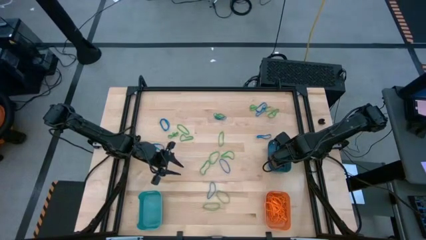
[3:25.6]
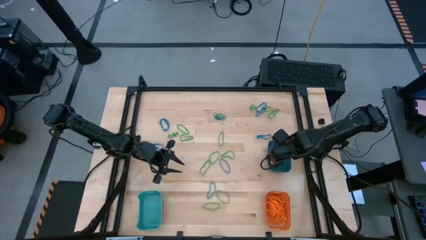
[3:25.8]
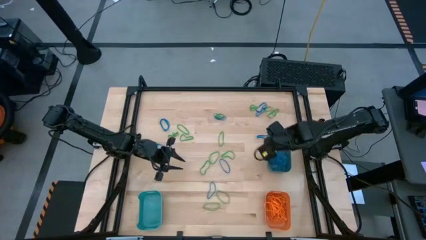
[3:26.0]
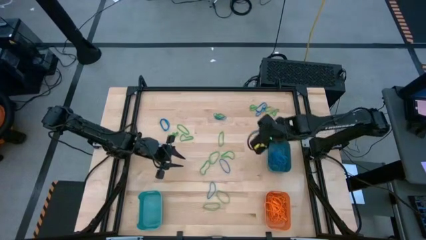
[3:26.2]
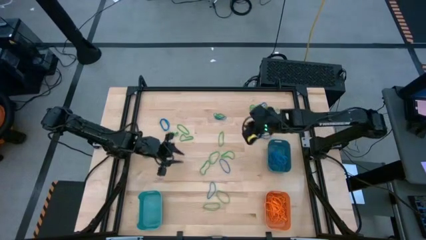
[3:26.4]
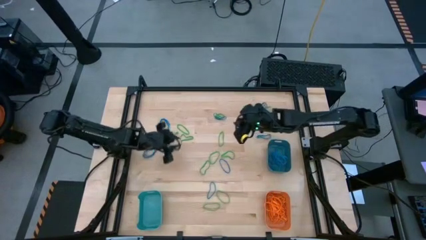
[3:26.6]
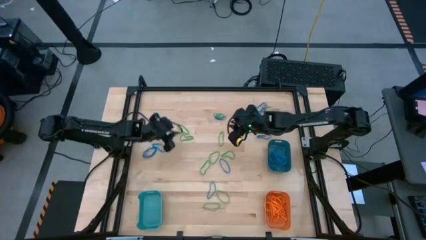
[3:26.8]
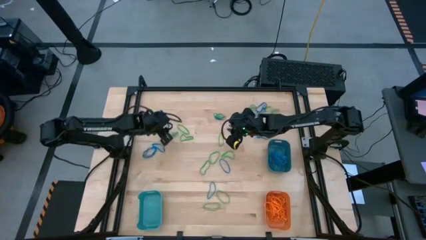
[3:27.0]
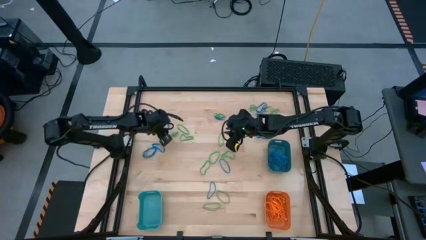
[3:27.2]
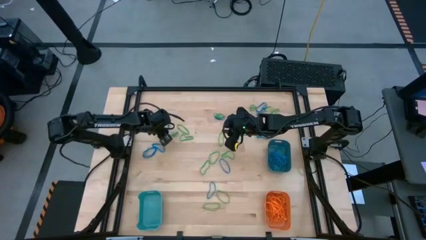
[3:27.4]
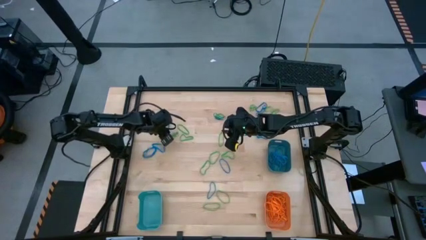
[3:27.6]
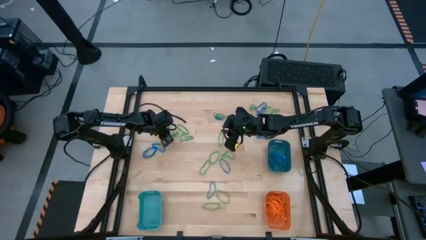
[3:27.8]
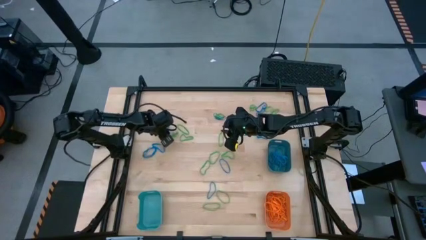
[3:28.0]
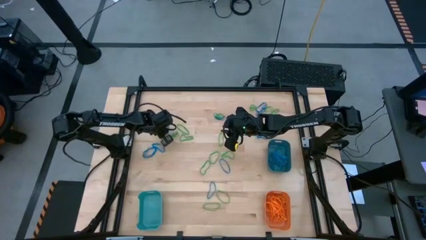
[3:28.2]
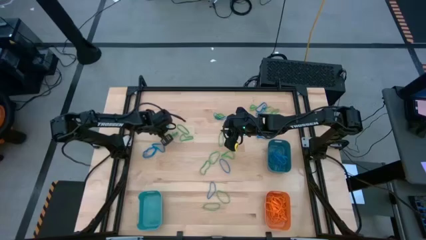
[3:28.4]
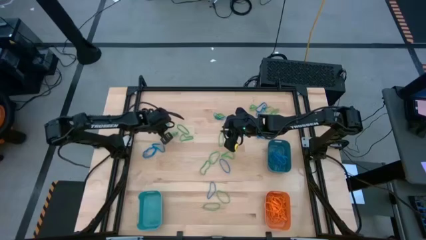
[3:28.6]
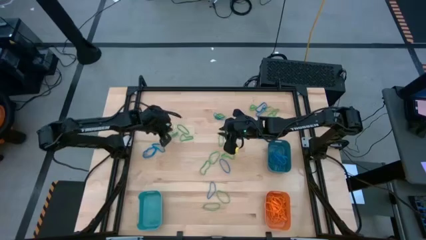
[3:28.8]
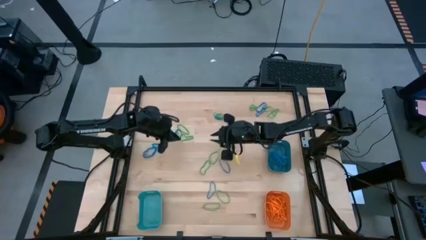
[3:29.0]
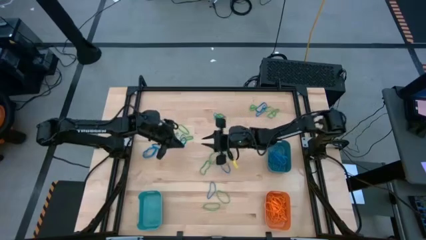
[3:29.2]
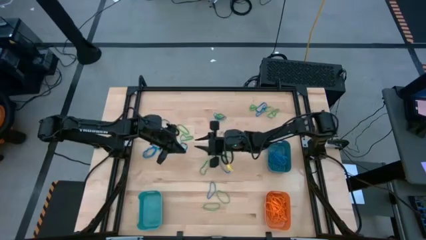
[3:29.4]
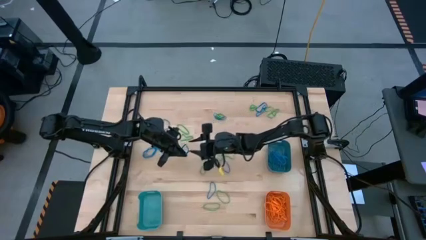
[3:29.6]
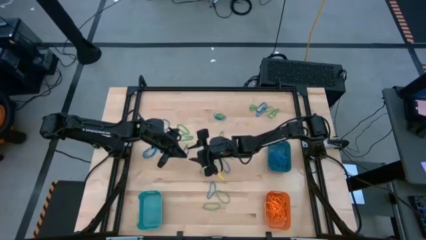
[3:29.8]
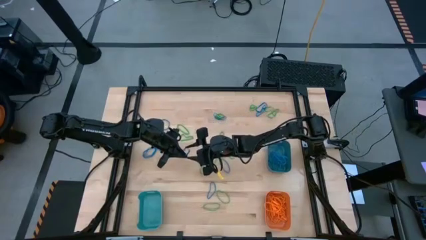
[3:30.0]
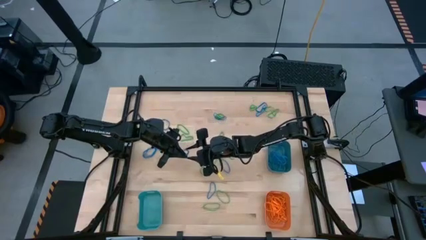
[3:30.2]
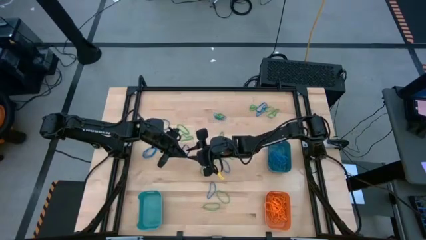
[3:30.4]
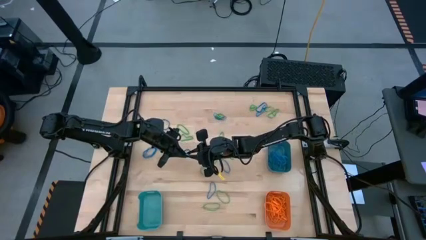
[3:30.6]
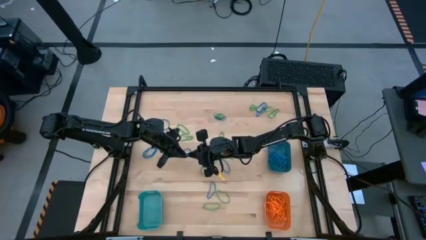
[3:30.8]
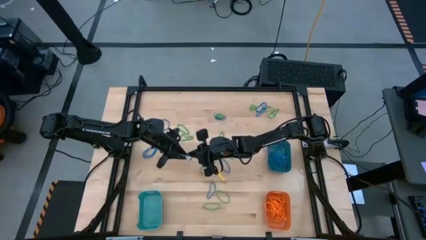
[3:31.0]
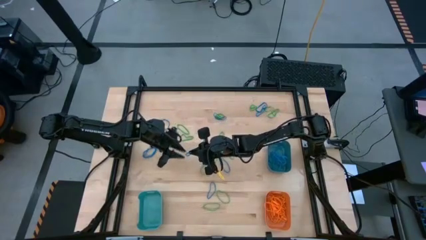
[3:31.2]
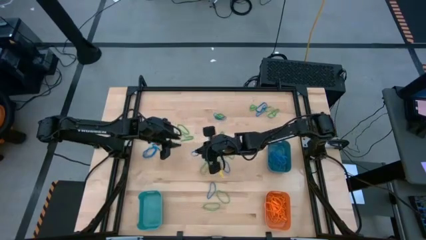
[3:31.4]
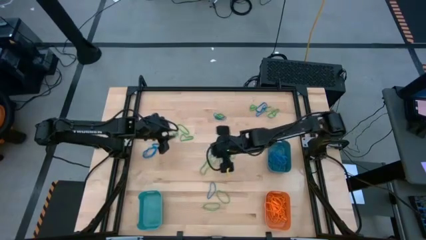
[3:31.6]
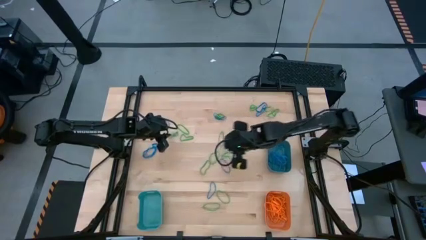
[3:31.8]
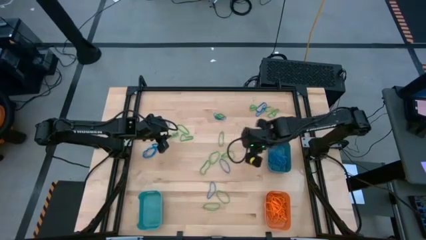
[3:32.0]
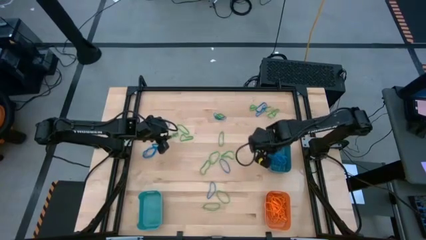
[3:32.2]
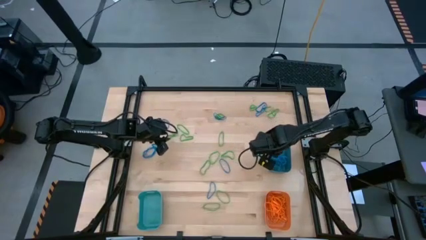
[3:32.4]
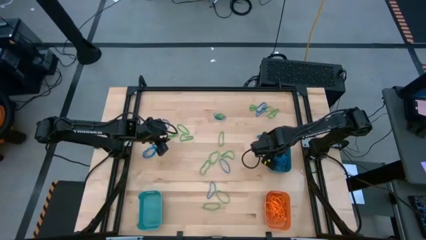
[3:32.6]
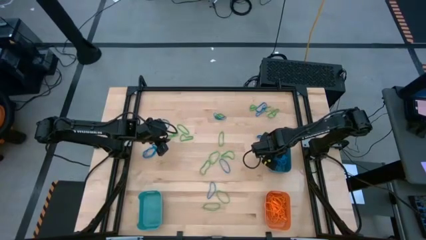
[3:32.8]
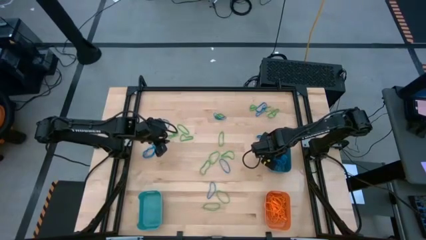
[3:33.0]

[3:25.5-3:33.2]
Task: Sort rubber bands into baskets
Put the blue rubber band into the dark blue bin

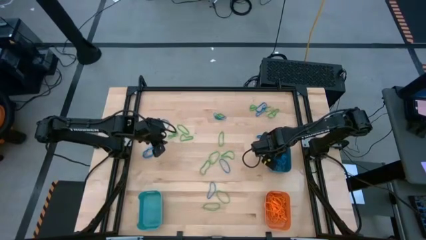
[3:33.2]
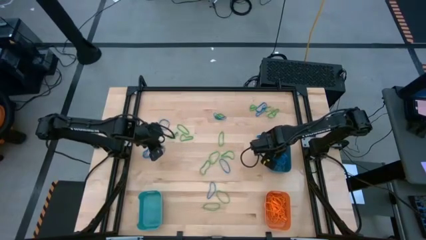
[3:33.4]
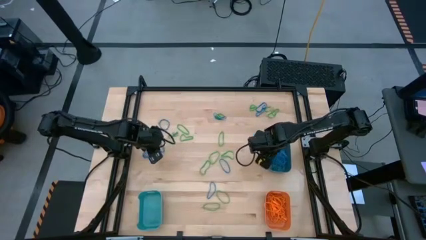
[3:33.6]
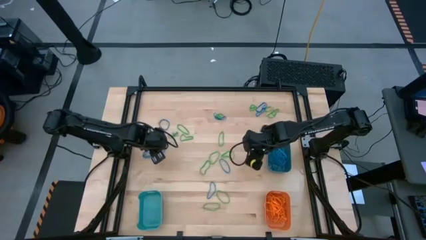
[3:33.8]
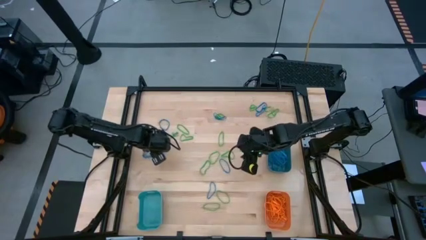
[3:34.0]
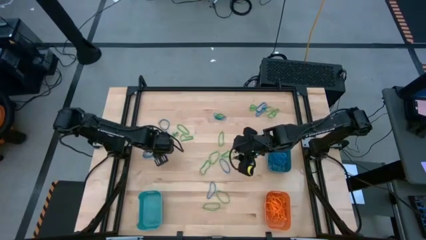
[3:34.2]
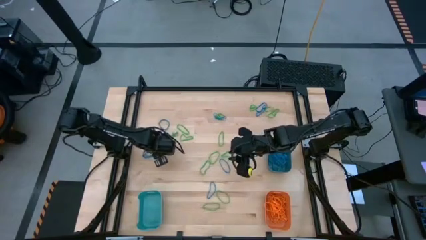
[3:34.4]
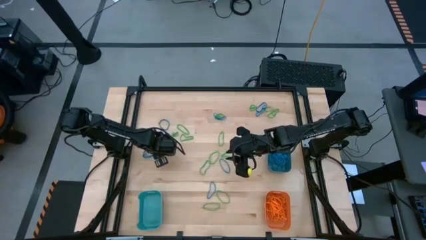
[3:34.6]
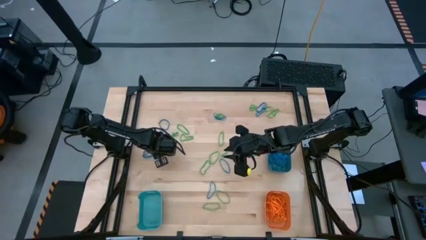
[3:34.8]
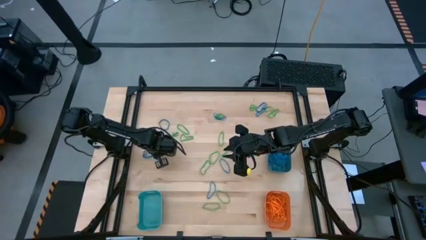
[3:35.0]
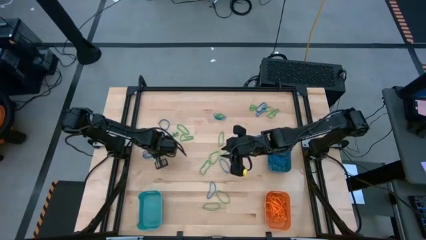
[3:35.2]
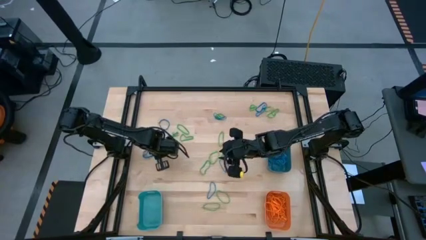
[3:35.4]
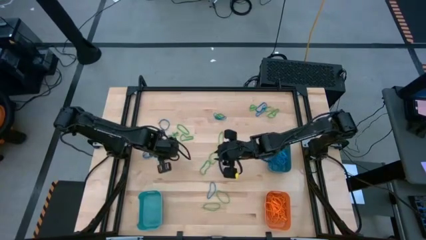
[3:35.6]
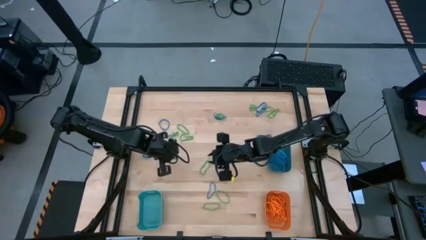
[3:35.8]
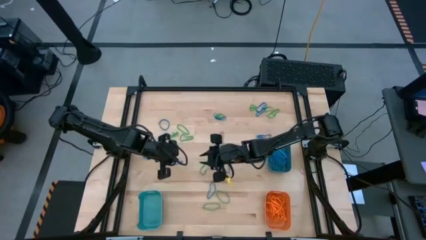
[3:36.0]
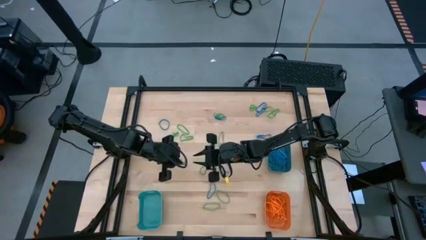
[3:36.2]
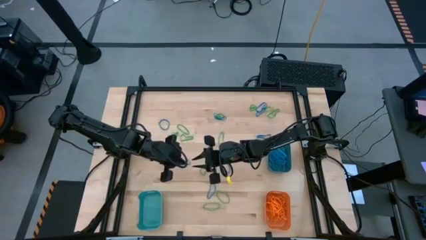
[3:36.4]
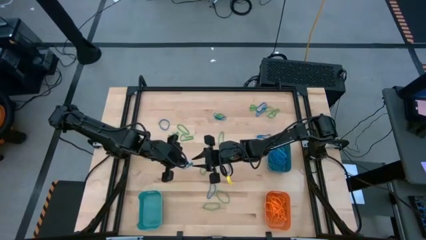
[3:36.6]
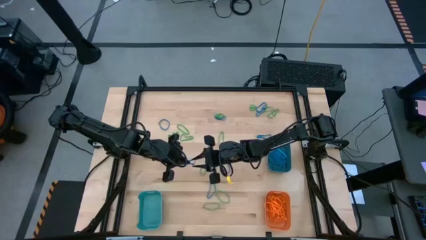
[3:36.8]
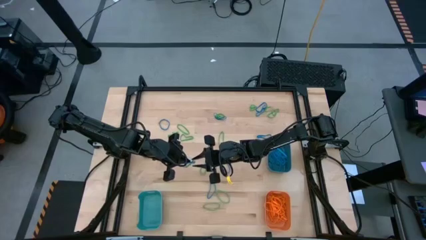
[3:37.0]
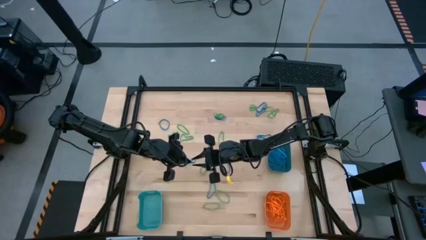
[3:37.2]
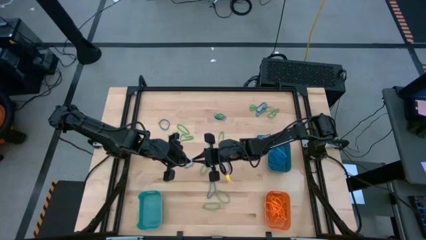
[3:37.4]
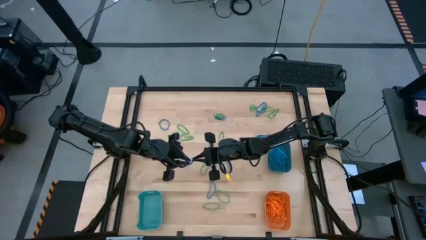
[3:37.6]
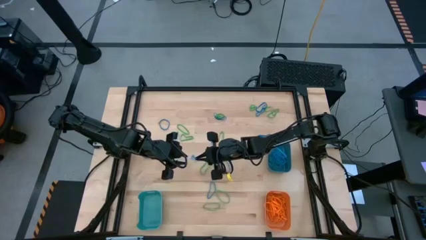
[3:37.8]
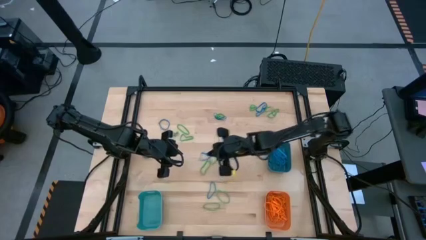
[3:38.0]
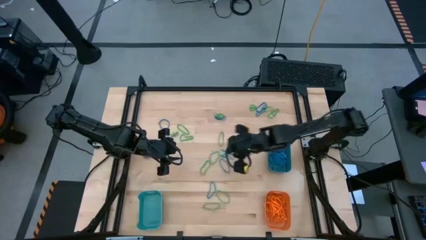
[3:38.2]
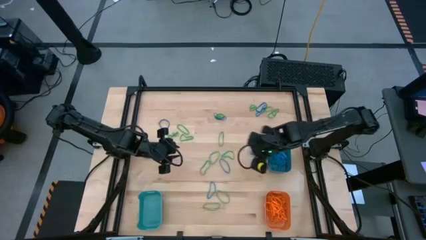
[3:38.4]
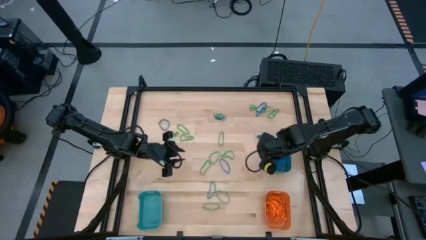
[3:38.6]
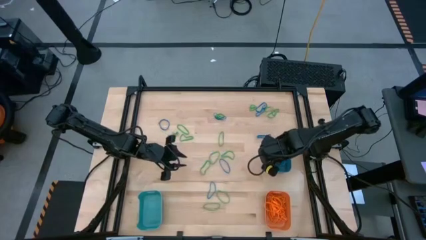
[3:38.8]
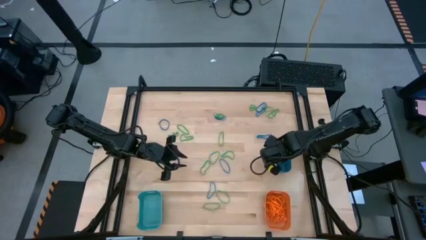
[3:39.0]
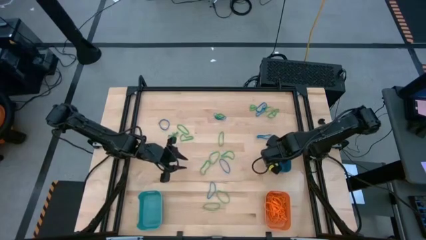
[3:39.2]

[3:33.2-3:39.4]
Put the blue rubber band into the dark blue bin

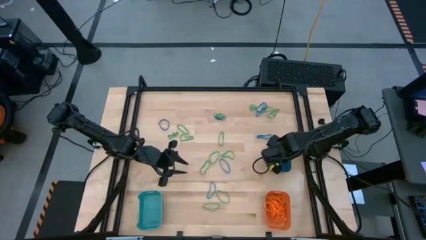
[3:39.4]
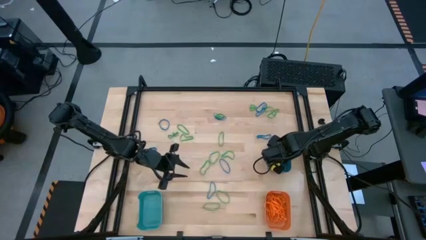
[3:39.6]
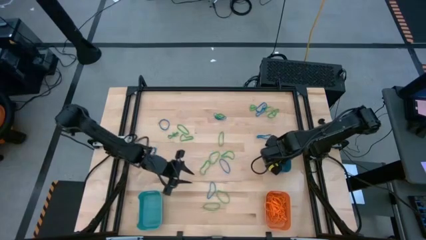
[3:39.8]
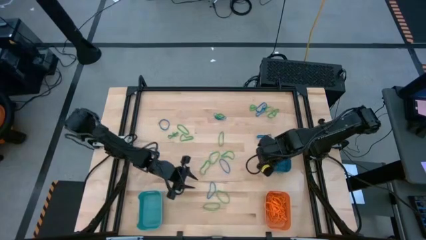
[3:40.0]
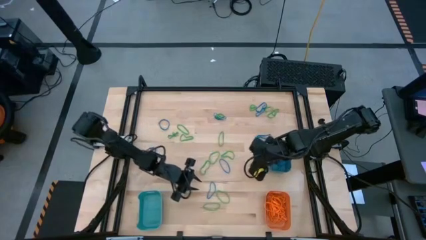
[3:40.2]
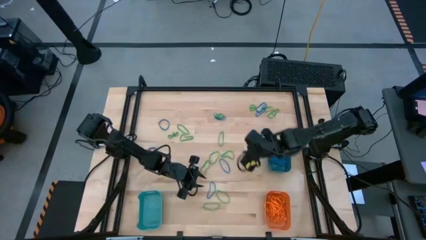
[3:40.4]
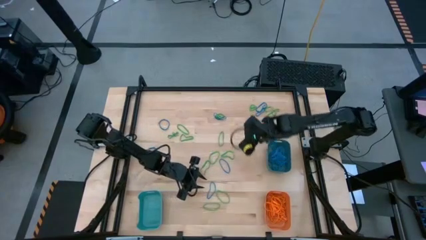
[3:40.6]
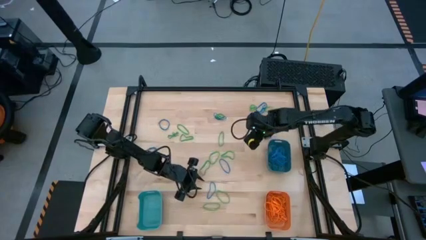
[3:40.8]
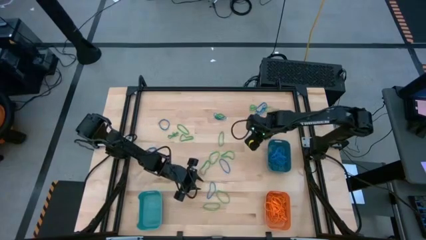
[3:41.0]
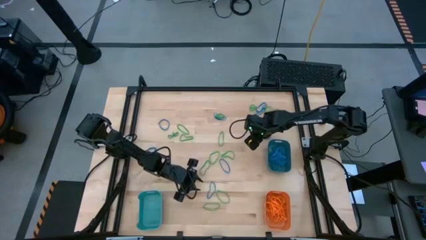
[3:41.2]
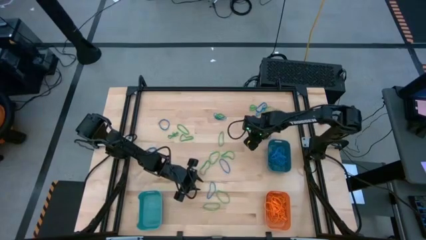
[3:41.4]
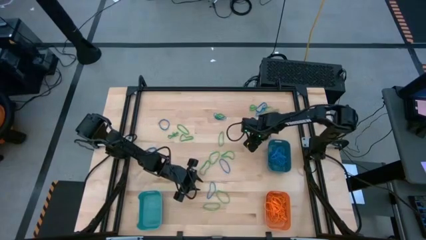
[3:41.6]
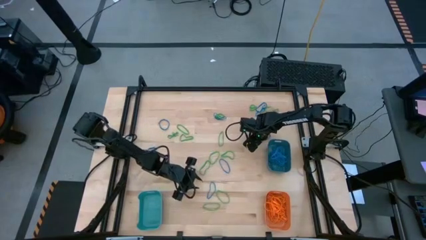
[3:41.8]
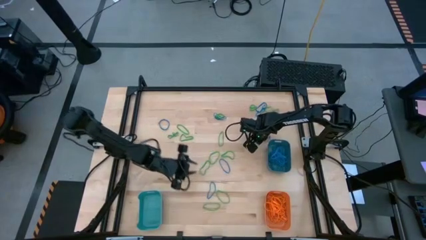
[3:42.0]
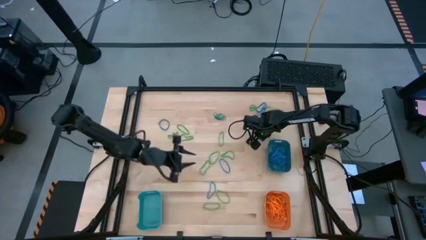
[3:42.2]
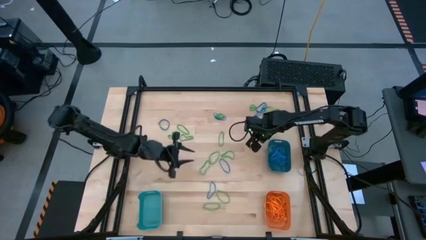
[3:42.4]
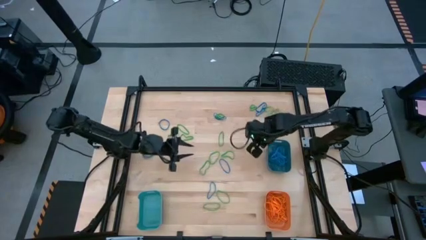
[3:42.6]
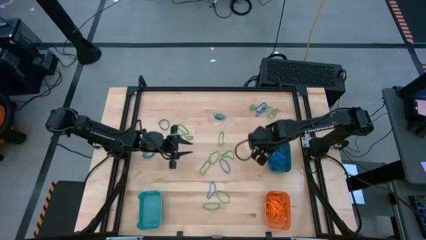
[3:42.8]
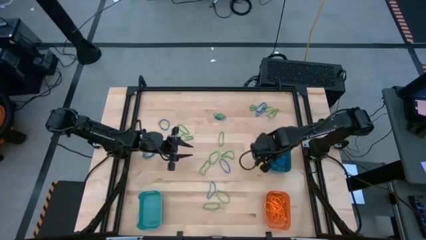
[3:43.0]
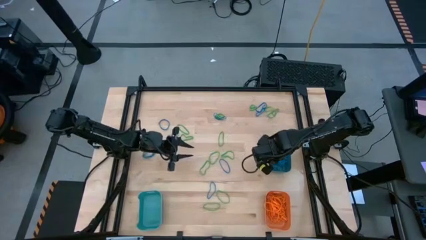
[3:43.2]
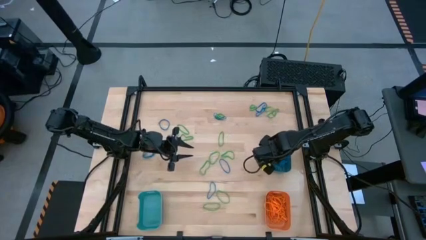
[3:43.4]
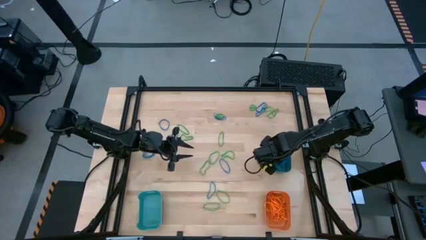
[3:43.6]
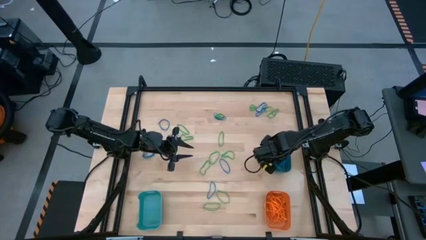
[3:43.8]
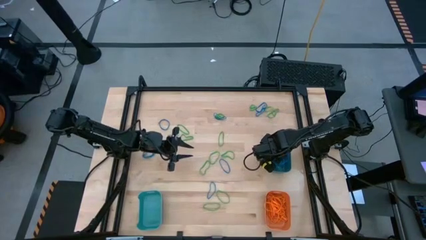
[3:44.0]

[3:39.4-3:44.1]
Put the blue rubber band into the dark blue bin
